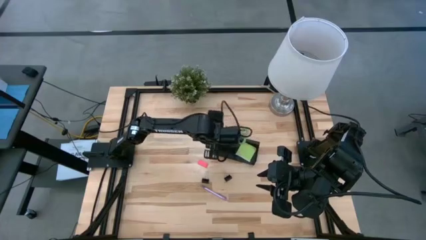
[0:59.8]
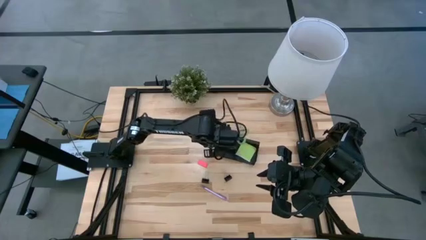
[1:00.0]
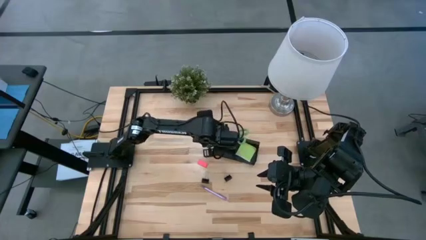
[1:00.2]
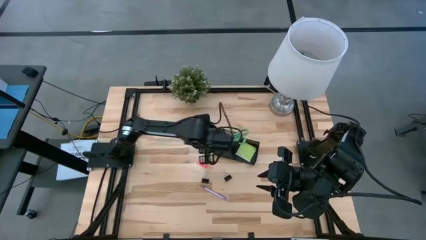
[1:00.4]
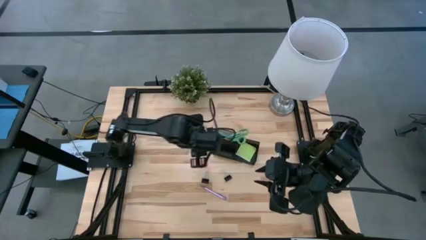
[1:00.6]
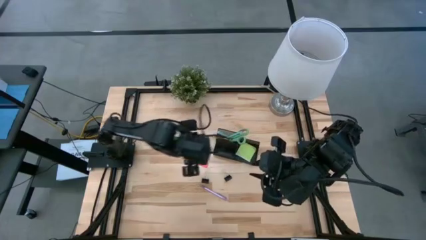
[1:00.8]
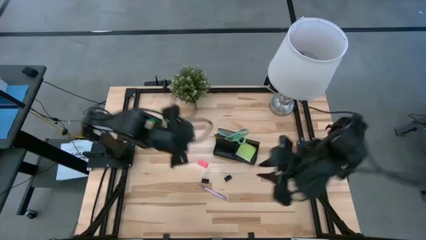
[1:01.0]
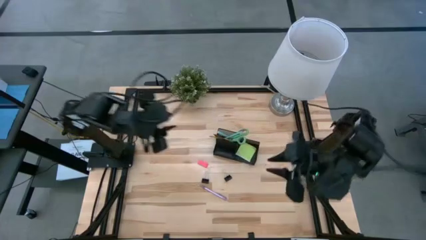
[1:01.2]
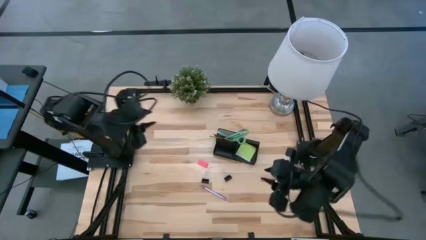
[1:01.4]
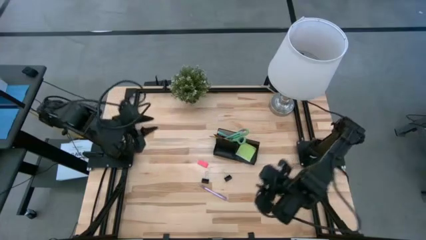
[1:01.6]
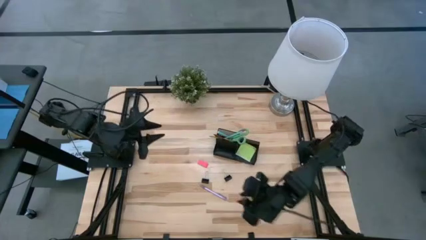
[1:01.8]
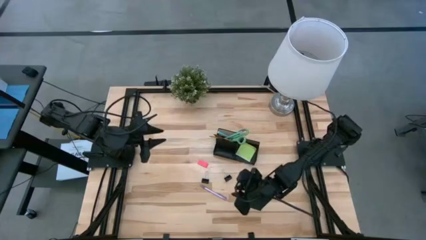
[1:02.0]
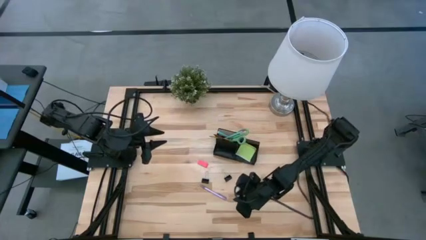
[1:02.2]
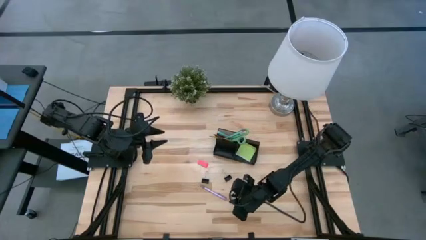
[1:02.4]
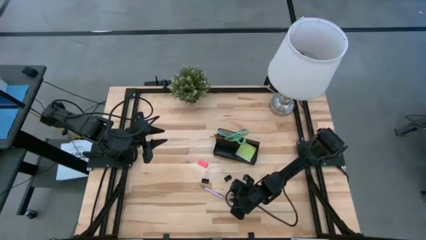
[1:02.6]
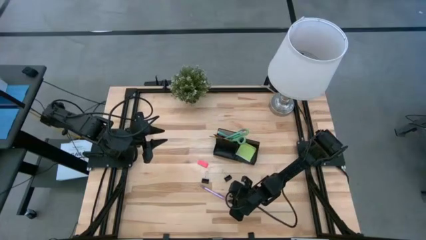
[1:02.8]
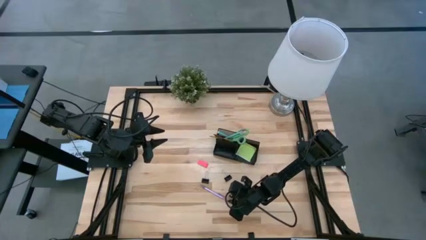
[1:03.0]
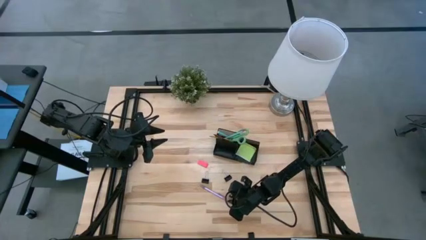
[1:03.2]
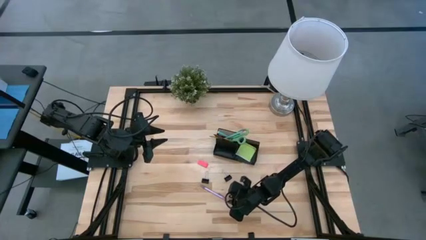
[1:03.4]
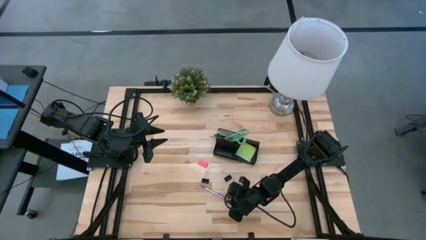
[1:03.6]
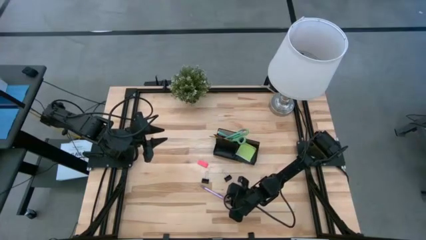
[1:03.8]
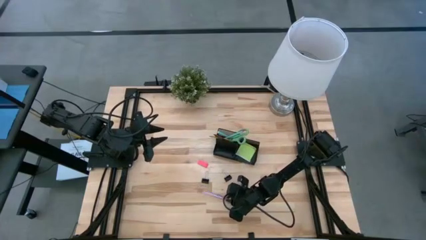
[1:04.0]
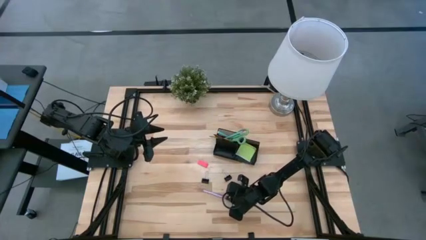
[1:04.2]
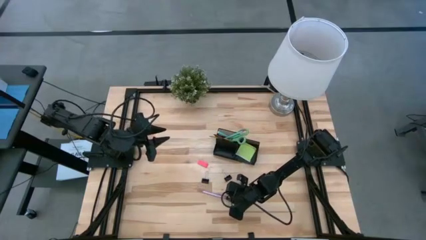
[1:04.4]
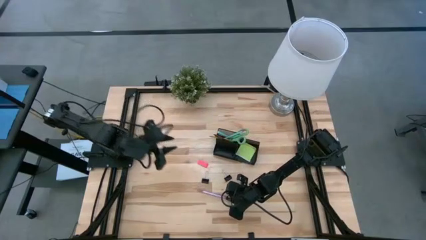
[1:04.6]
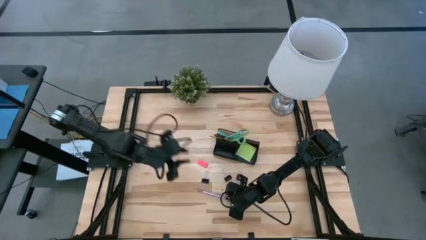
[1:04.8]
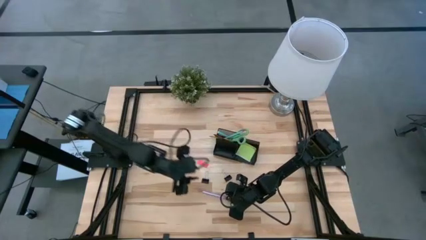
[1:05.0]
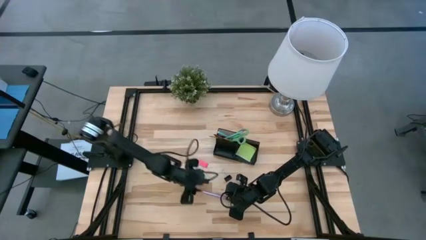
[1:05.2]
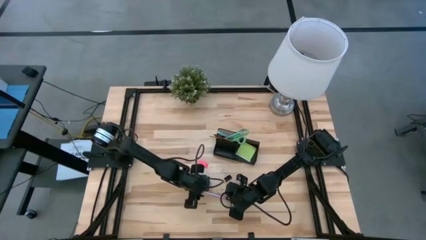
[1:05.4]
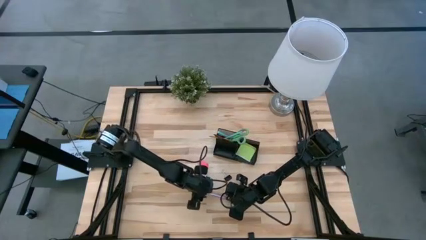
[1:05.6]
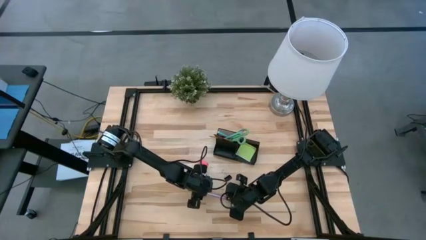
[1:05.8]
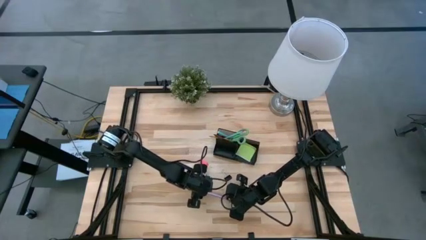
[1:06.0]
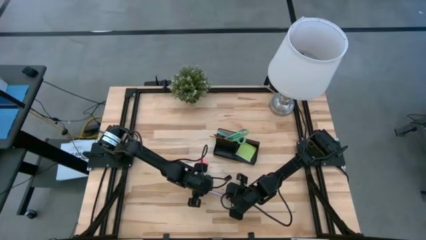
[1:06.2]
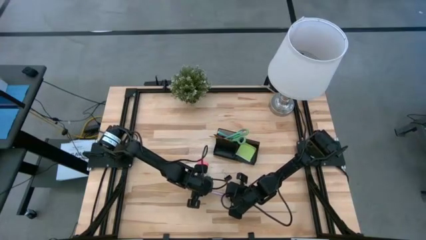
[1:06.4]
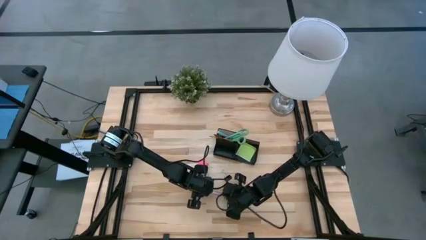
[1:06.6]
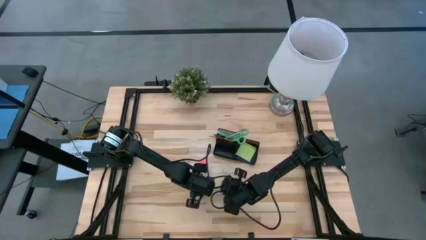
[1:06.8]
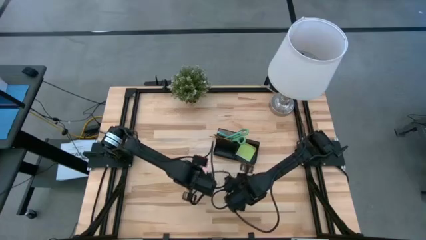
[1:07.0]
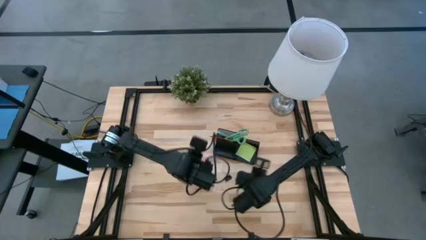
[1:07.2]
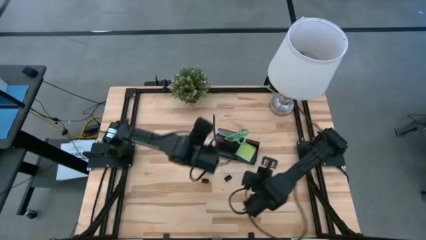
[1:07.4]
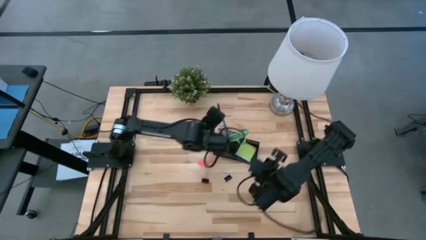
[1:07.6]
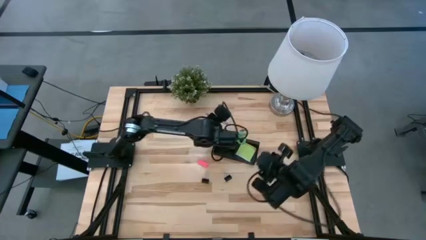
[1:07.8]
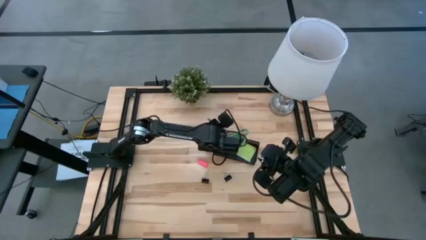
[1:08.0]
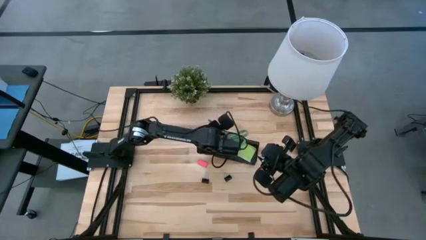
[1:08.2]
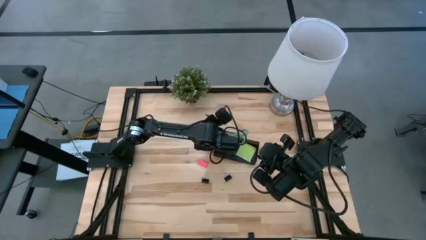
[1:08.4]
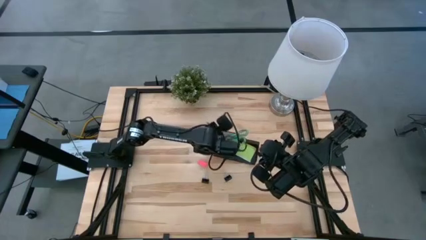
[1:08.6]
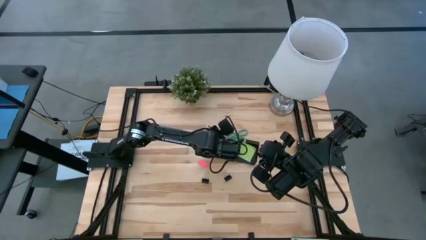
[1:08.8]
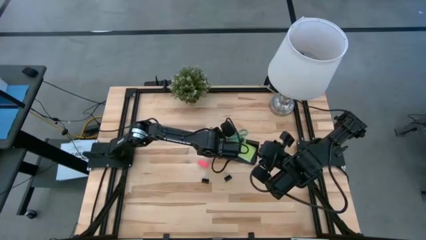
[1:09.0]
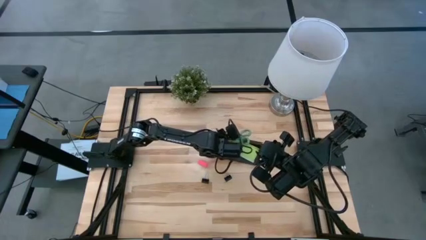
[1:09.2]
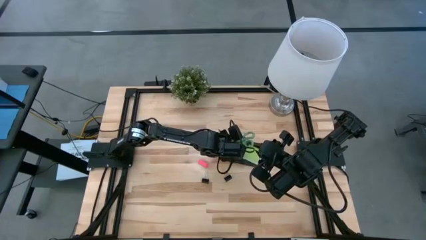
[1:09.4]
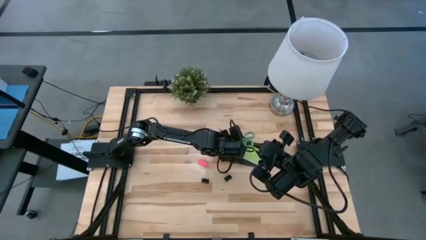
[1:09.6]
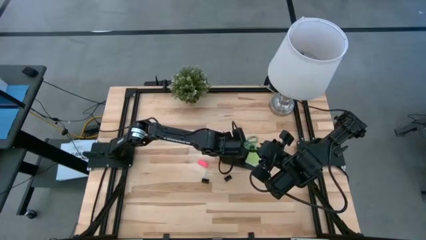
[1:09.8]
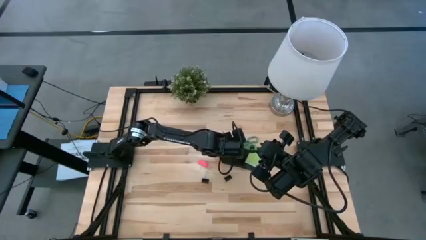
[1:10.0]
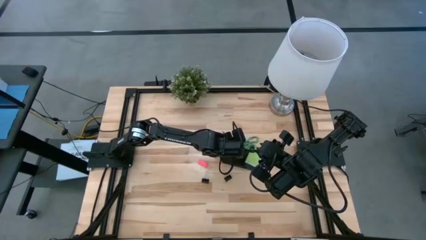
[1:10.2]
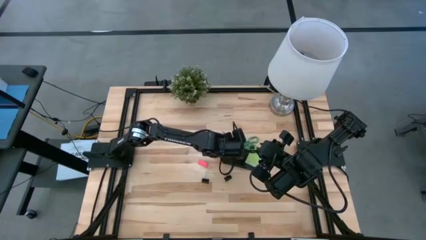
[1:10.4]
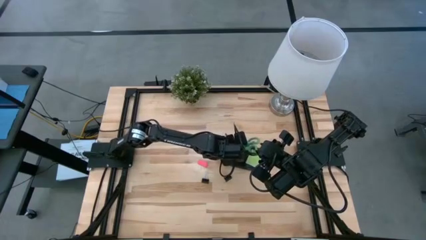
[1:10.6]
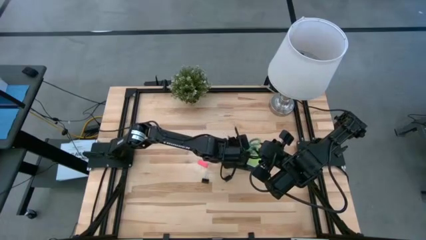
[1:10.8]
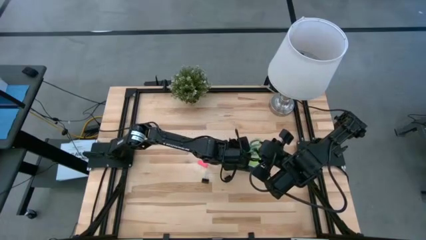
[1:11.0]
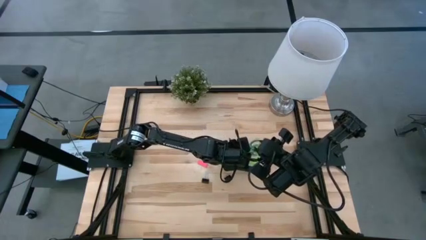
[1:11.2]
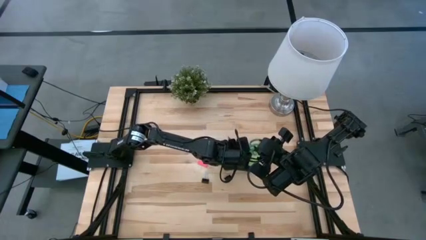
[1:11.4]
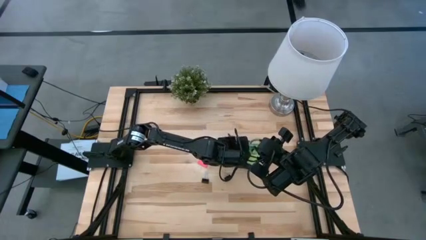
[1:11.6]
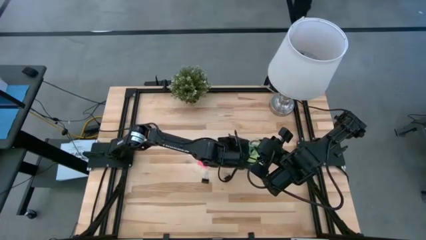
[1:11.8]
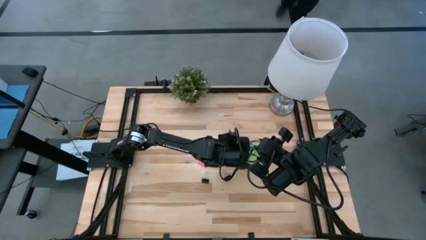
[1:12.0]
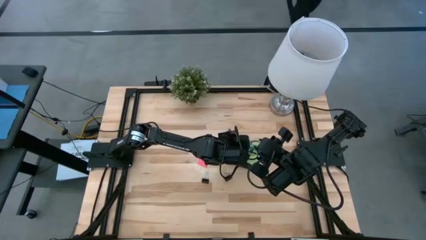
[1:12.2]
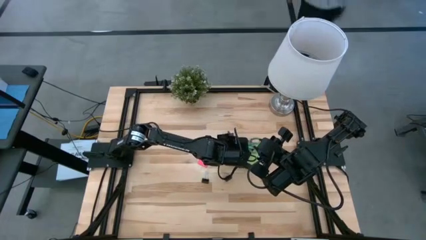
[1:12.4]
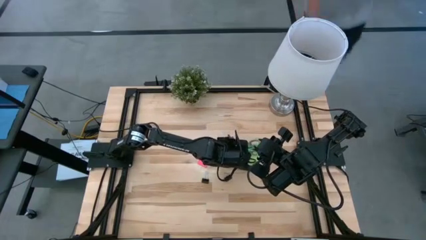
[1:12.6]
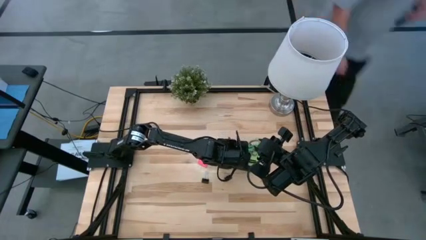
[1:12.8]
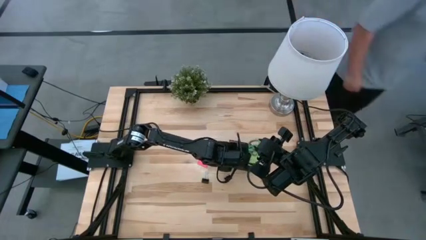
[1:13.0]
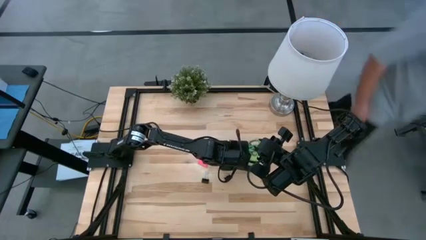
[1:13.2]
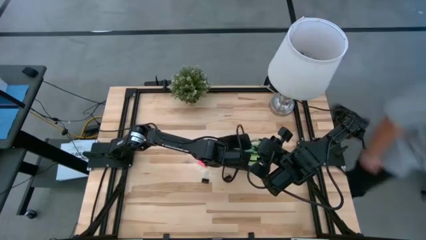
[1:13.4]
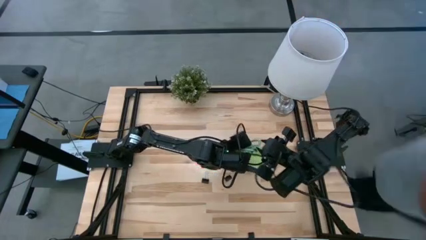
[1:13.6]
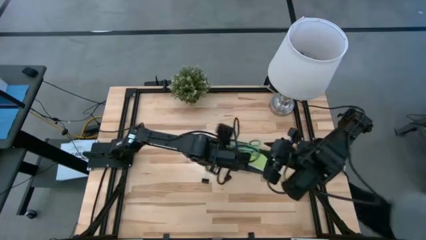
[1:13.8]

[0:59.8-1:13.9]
Task: Pick and place office supplies into organizer
Put the purple ballpen on the black desk organizer

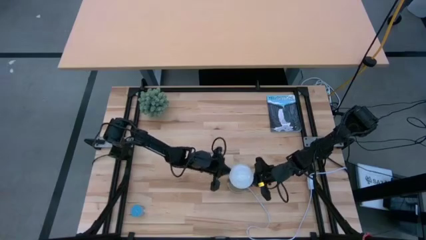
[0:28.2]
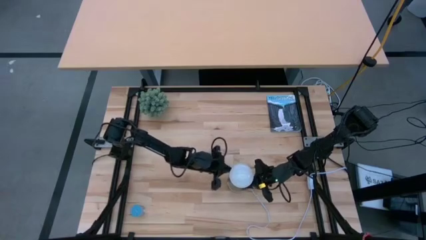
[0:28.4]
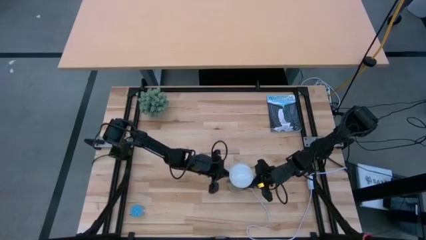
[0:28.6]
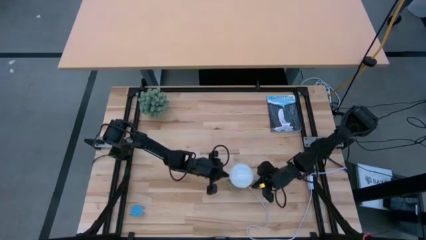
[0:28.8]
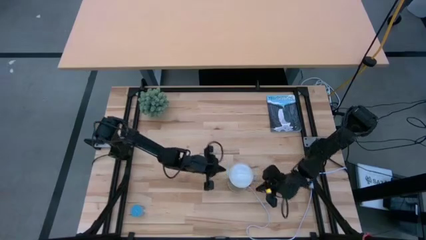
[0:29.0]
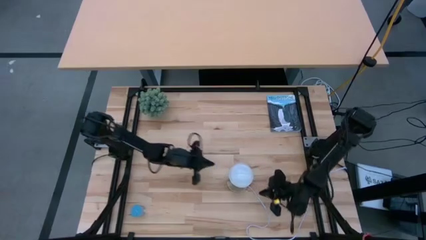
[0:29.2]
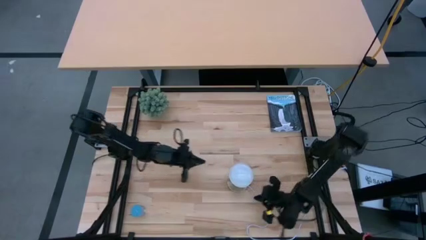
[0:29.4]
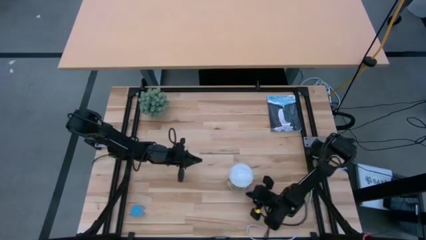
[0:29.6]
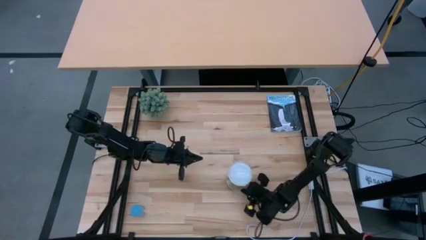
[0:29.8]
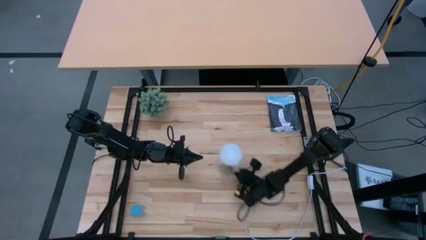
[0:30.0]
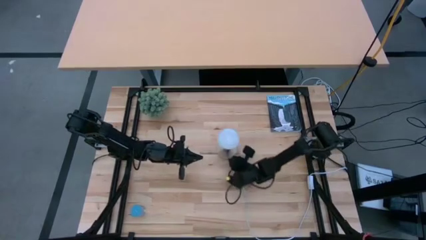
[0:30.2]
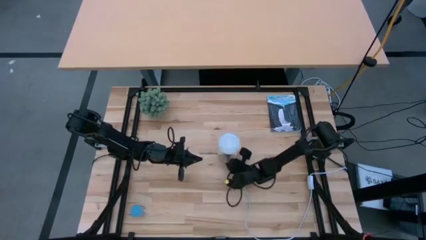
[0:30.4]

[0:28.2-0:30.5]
Task: Screw lightbulb
Move the lamp to the center of the table
